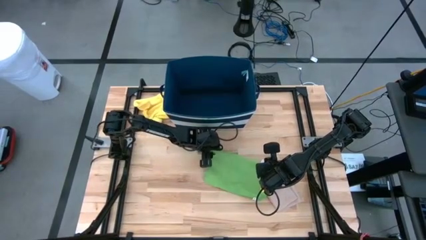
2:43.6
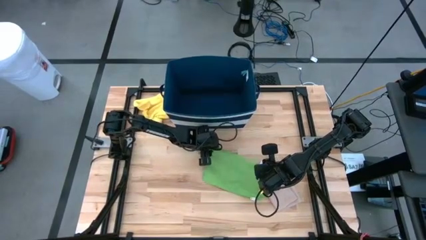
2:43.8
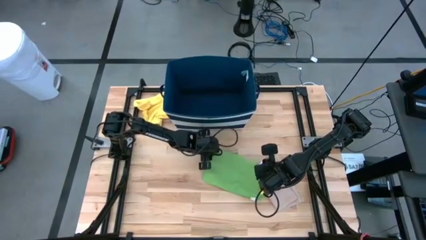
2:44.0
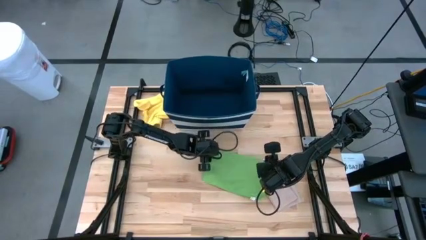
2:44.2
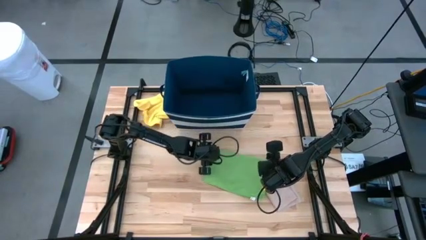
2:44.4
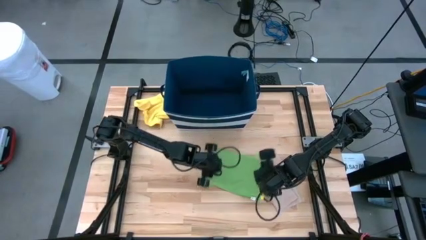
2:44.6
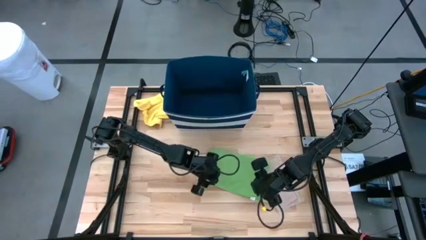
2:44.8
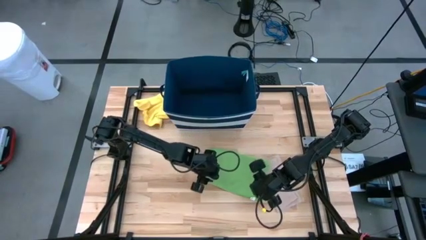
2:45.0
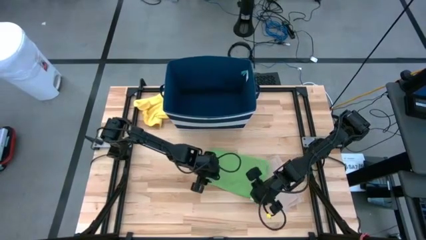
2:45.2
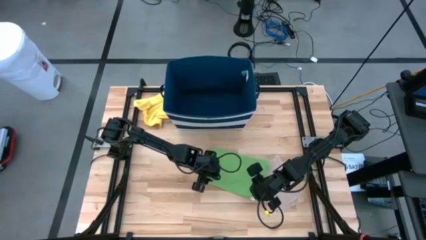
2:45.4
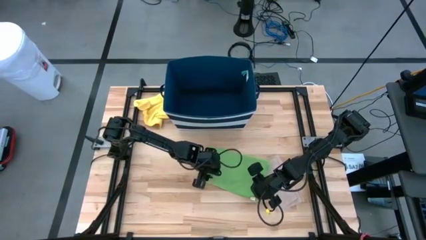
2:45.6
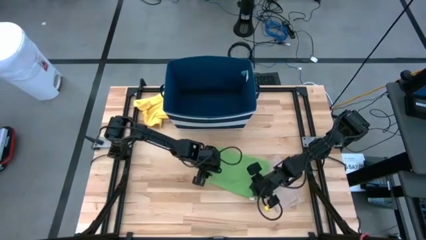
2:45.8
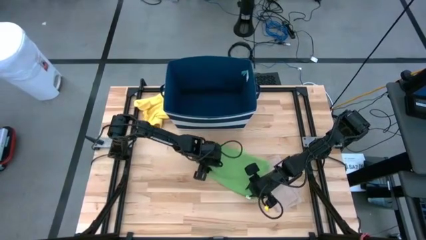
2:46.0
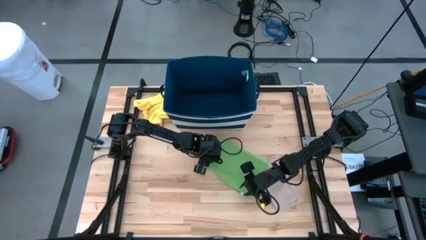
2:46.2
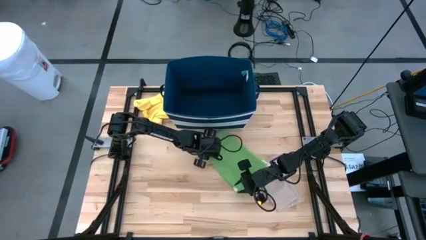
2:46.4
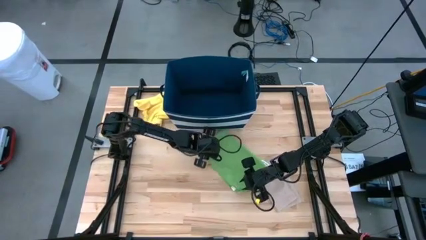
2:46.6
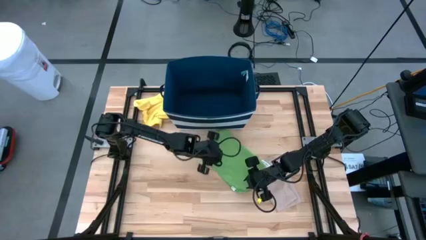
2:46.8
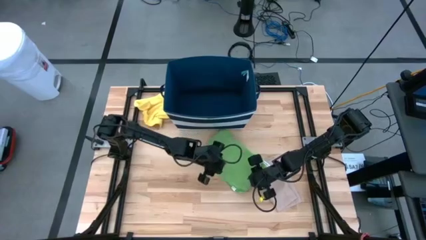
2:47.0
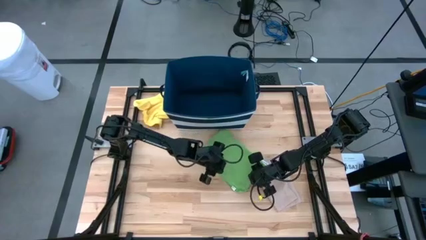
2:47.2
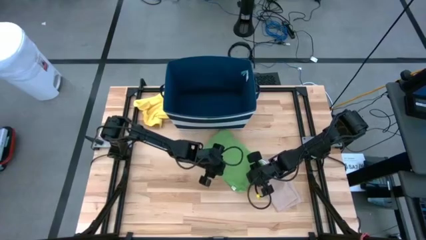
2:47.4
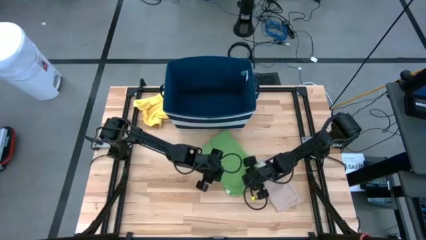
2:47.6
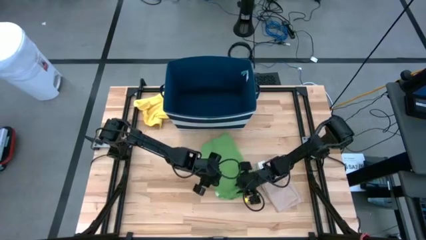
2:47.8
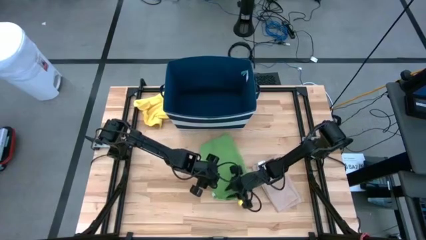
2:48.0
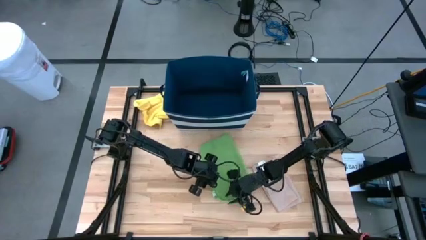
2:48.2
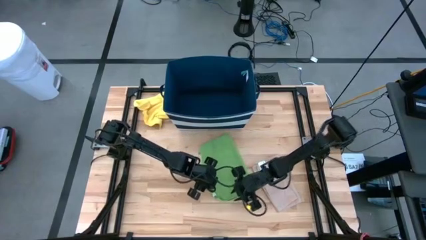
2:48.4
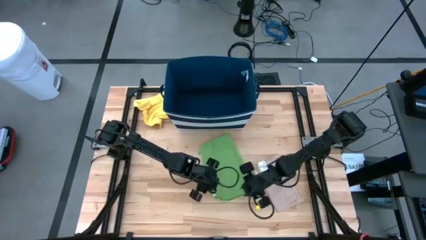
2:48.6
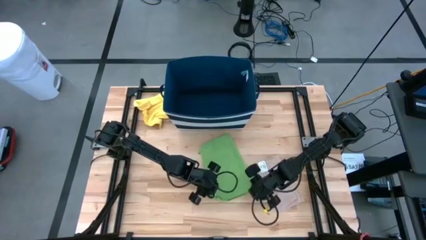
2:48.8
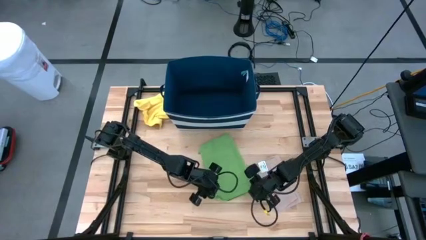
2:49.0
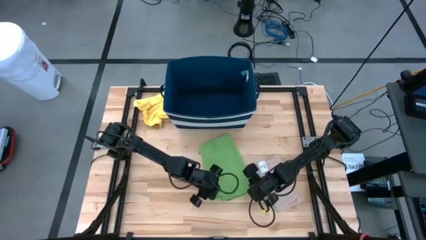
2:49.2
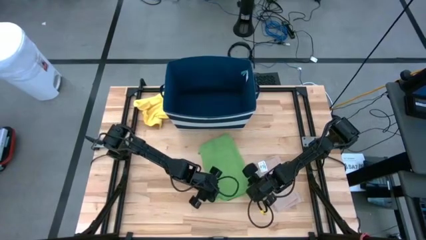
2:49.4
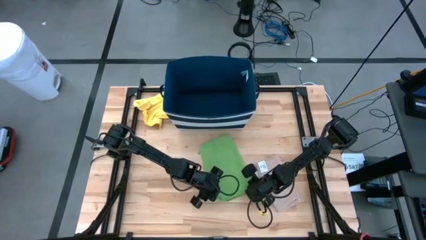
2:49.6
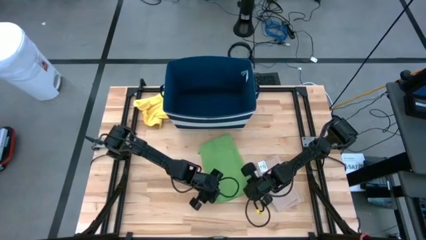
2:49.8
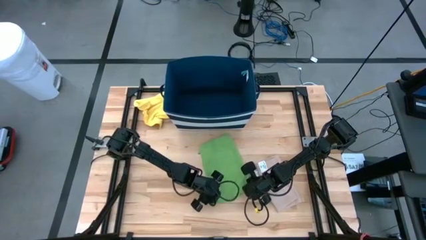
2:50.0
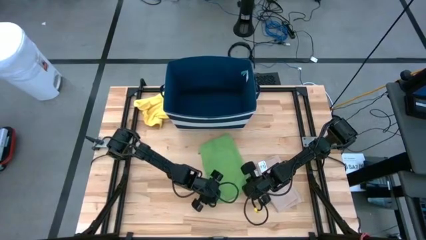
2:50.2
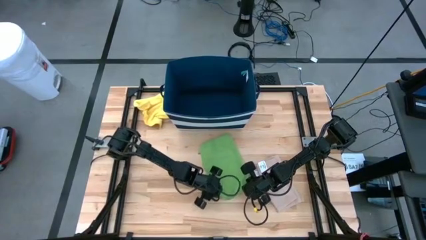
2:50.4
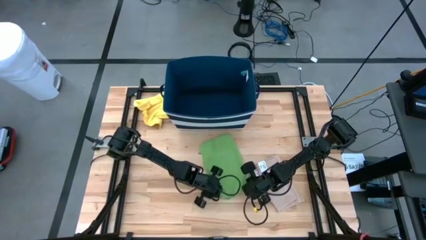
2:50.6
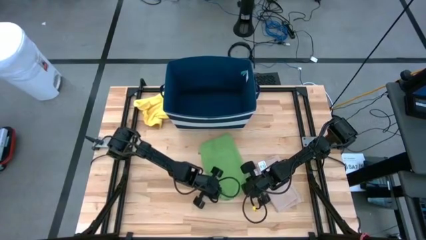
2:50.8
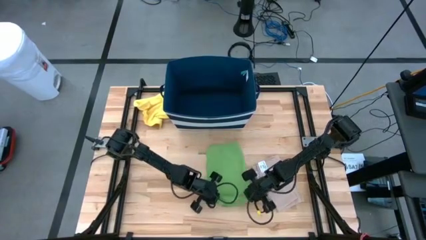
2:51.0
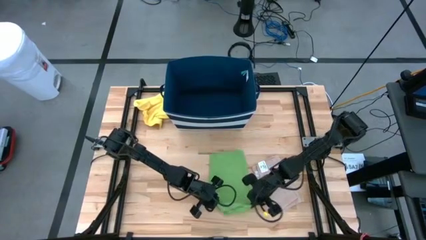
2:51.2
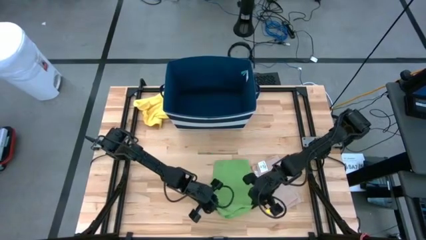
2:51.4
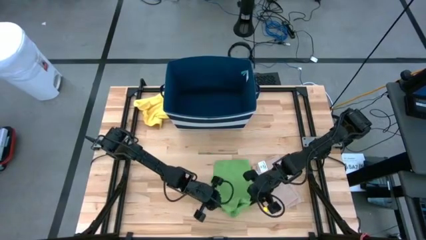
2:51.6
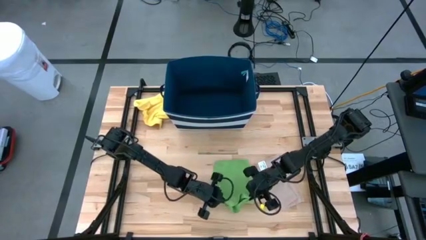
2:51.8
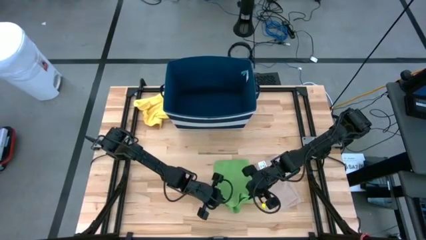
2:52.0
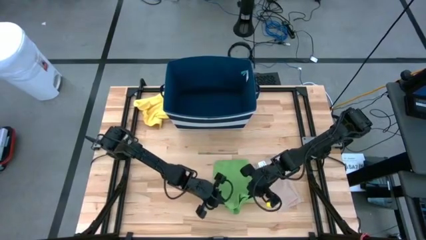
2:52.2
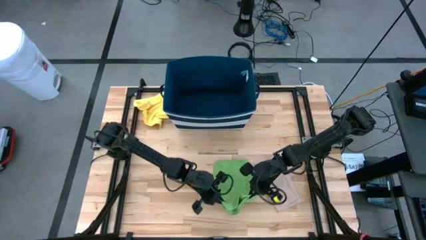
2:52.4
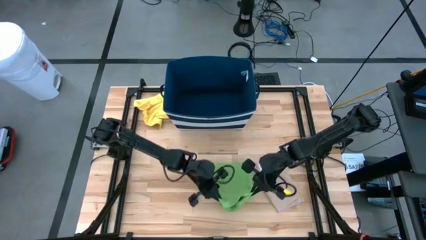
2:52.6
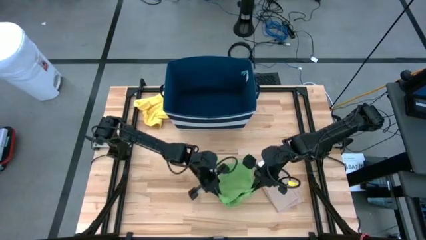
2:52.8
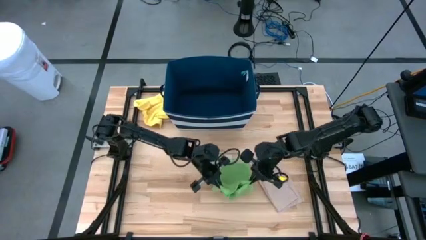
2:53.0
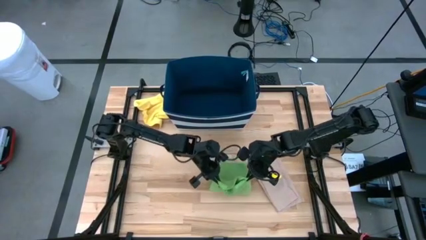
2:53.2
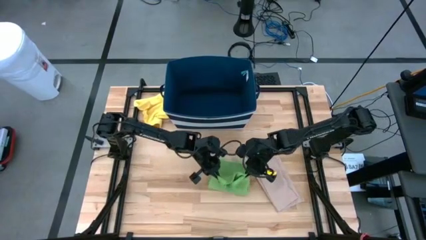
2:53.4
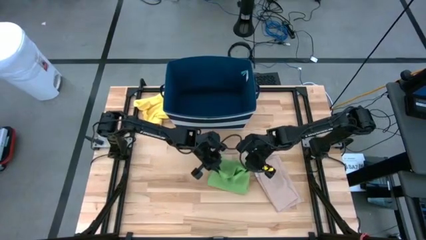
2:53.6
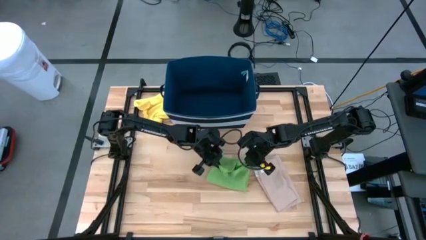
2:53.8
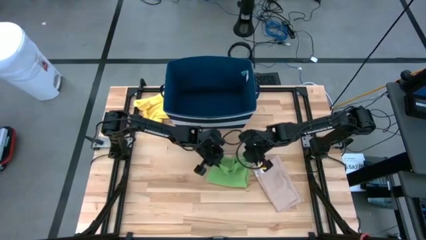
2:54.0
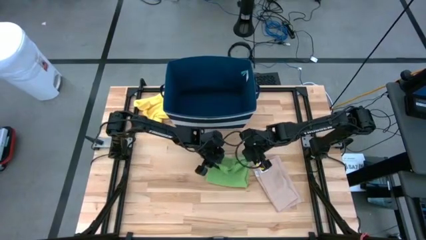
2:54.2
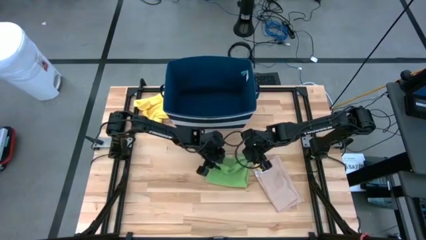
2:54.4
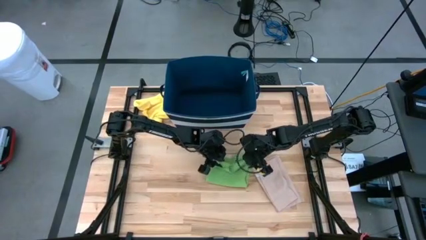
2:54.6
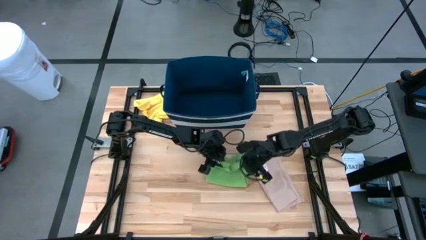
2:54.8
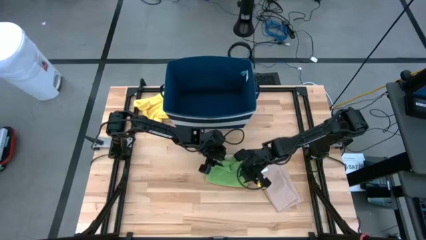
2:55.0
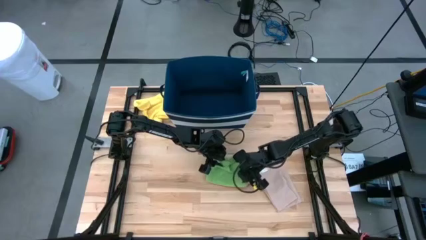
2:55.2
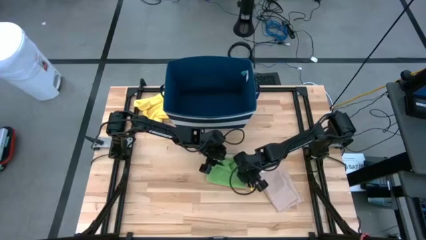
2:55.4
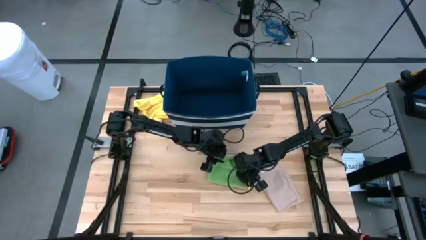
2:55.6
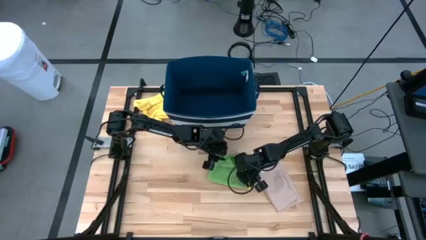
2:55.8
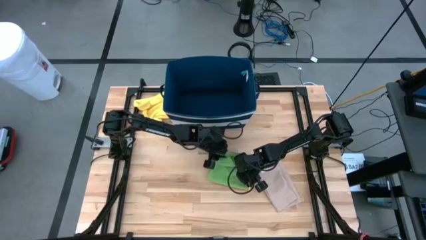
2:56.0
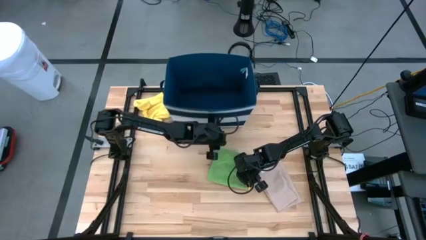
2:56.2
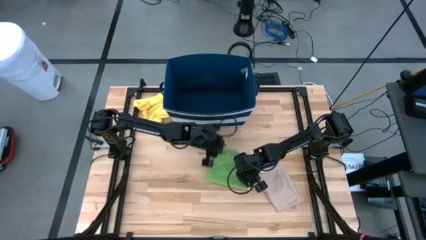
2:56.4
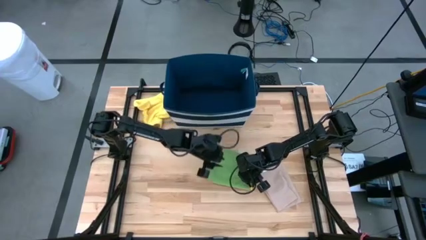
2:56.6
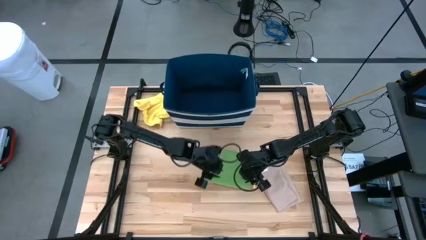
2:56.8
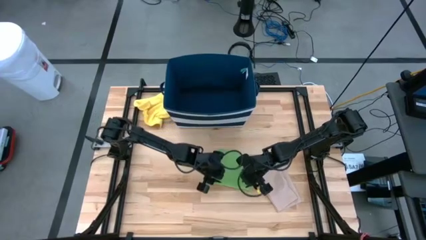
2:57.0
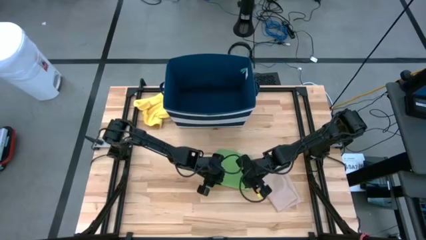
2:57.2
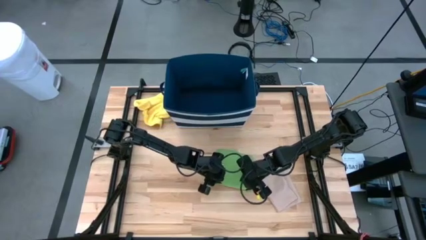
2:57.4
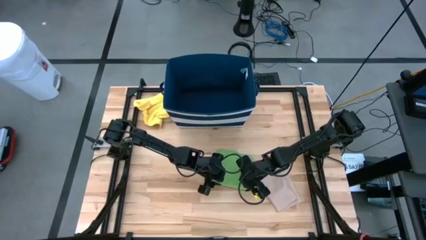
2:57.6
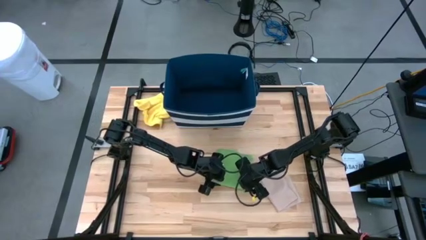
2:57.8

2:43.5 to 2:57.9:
Task: Fold towel
Fold the green towel
